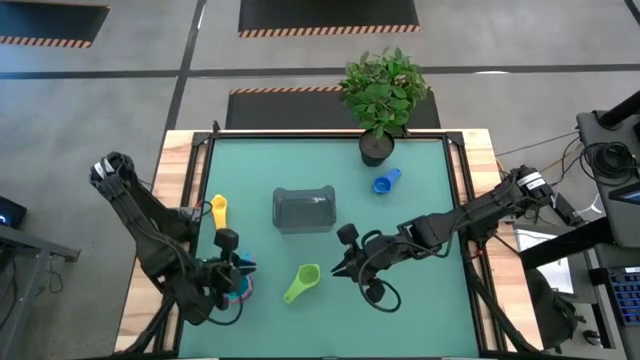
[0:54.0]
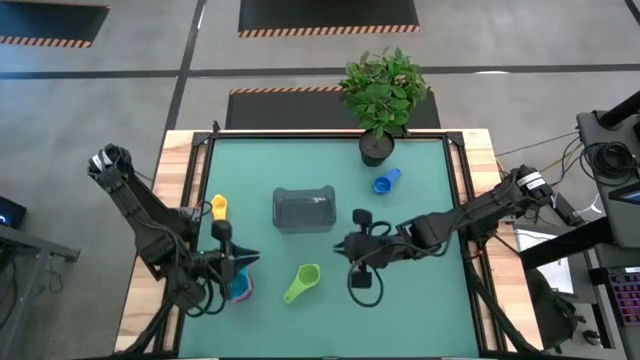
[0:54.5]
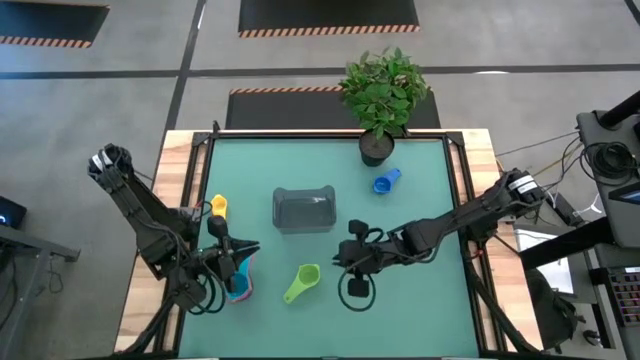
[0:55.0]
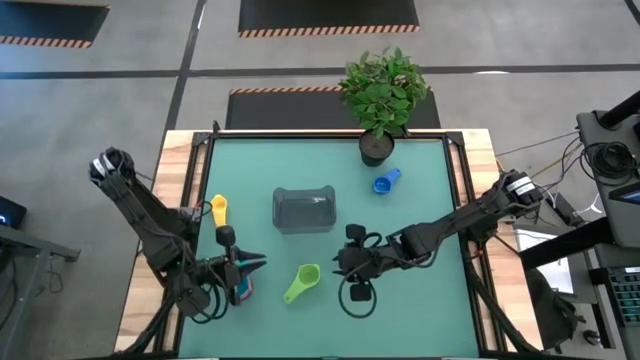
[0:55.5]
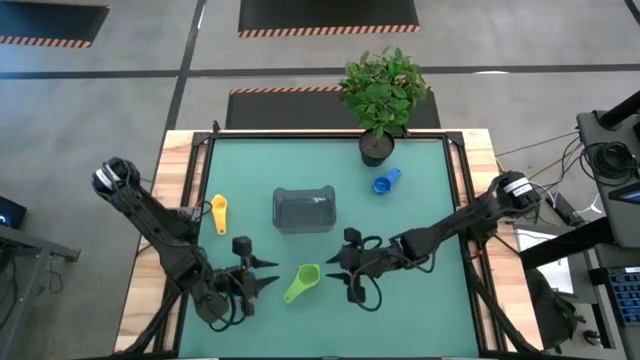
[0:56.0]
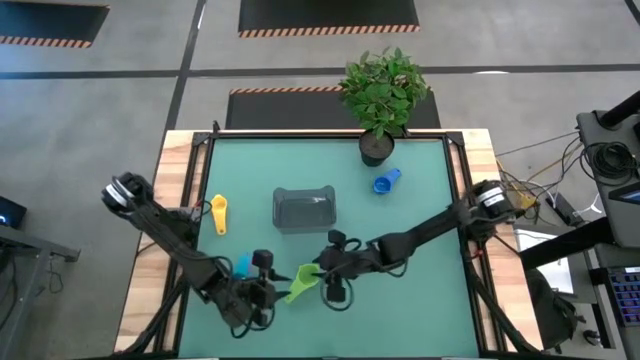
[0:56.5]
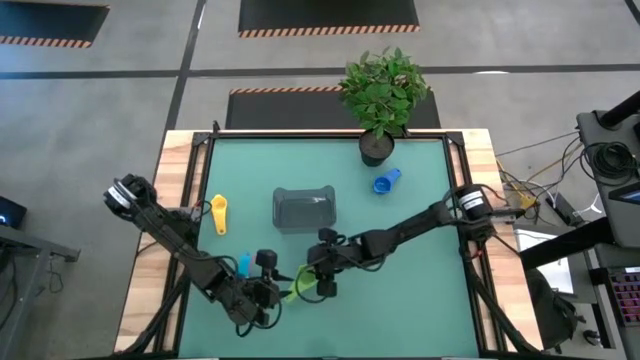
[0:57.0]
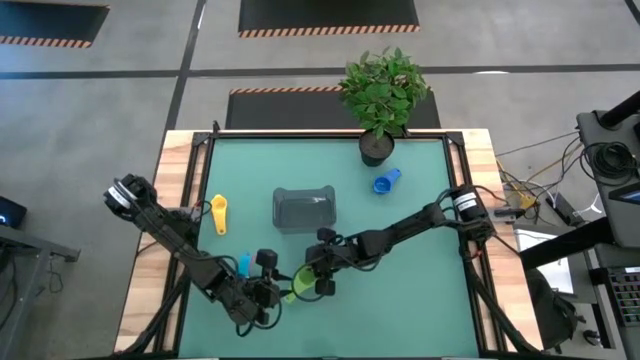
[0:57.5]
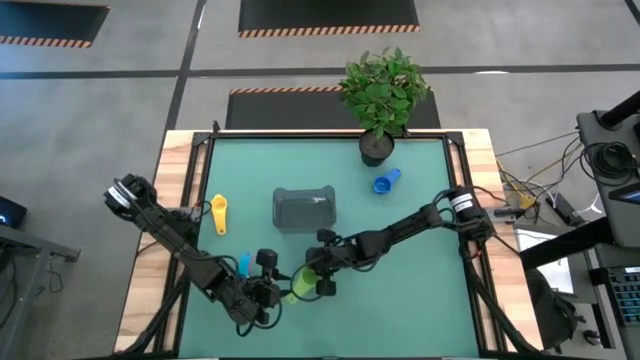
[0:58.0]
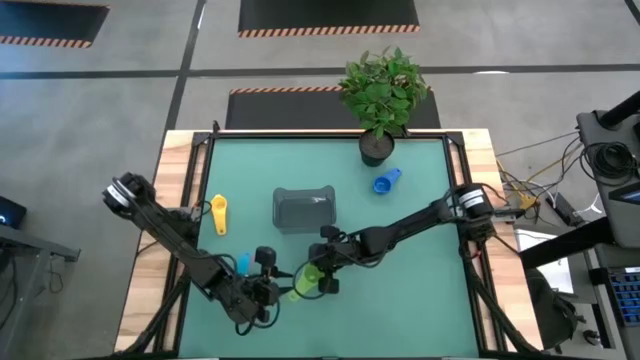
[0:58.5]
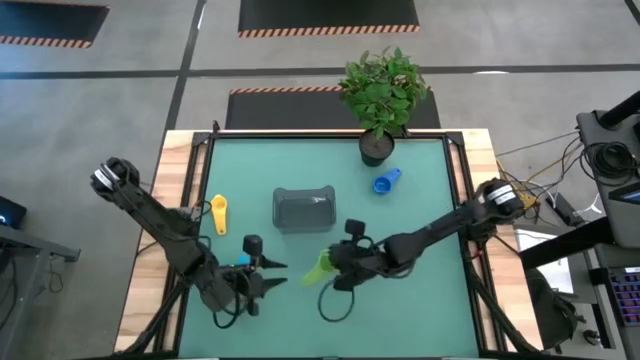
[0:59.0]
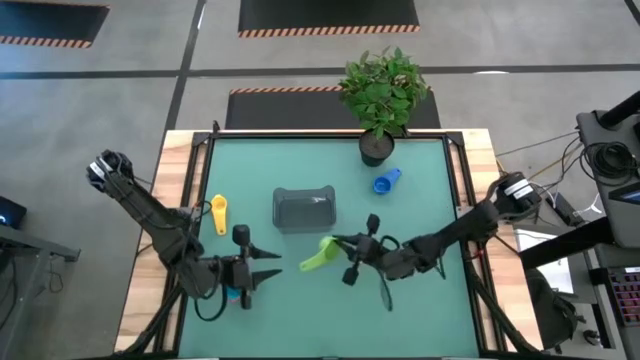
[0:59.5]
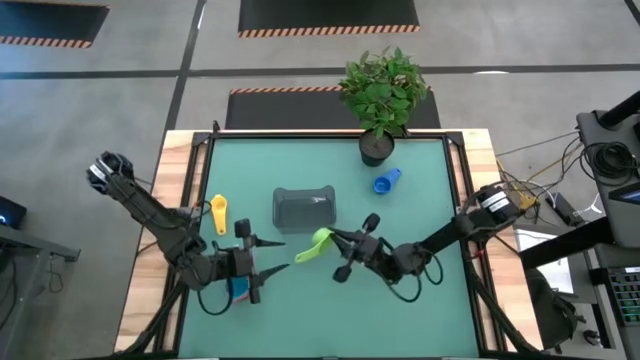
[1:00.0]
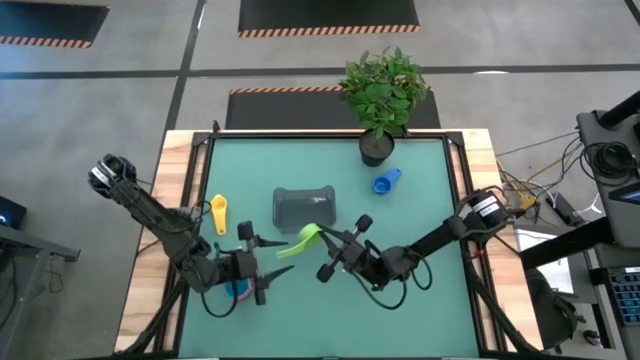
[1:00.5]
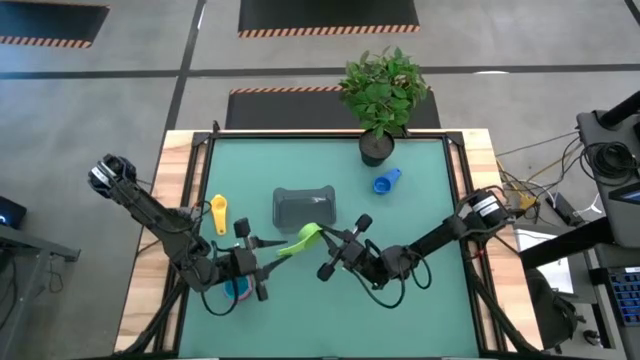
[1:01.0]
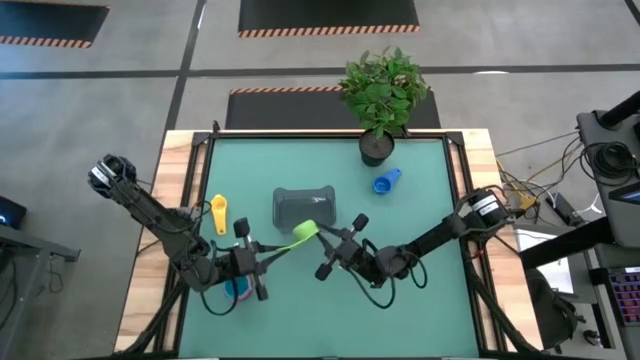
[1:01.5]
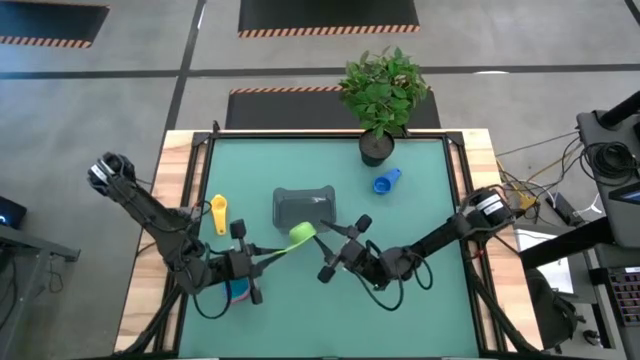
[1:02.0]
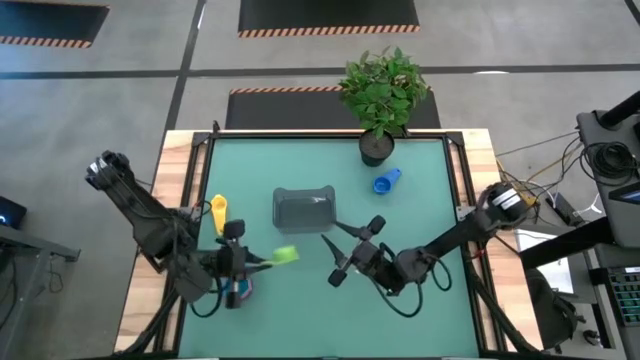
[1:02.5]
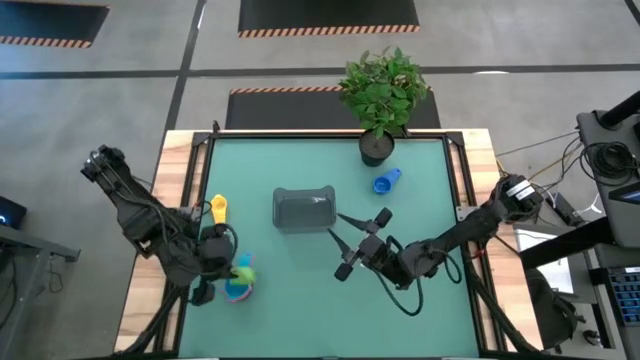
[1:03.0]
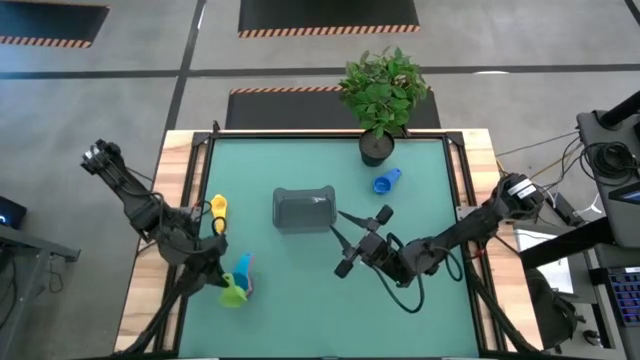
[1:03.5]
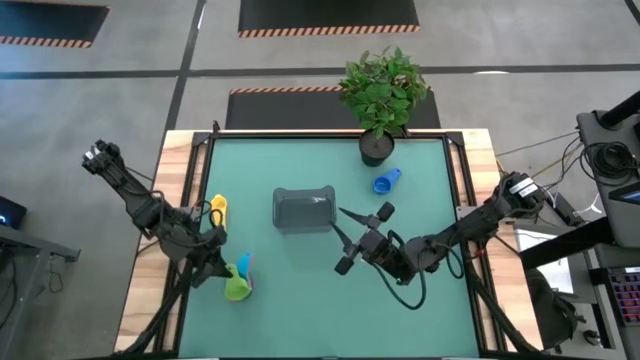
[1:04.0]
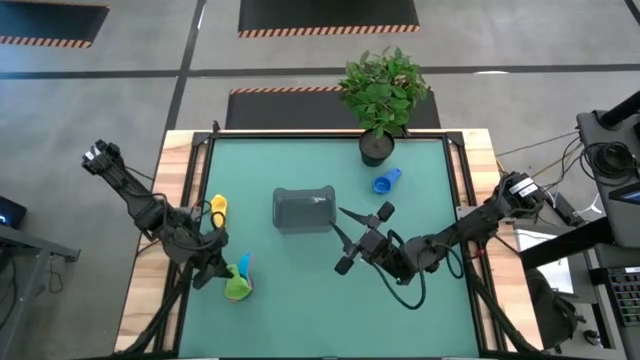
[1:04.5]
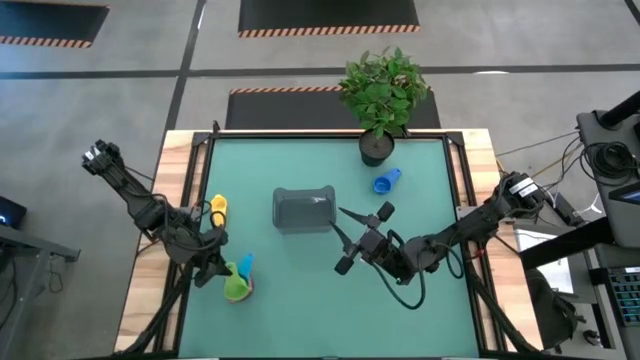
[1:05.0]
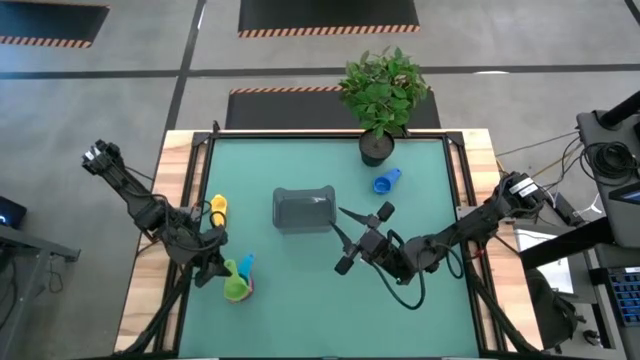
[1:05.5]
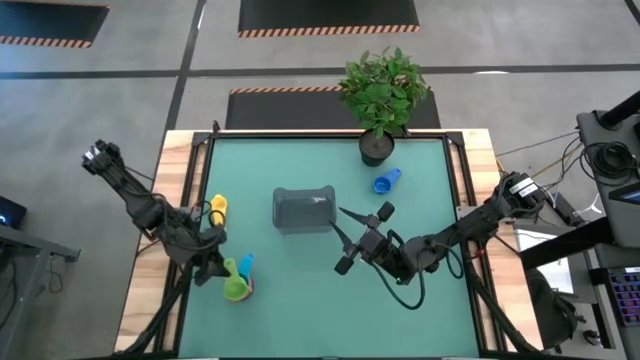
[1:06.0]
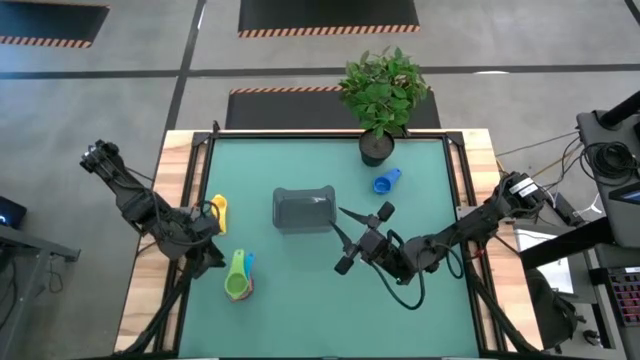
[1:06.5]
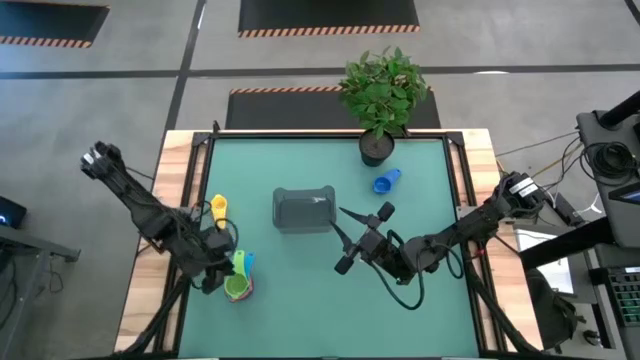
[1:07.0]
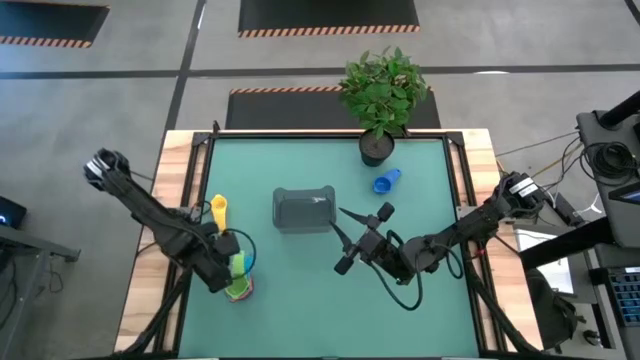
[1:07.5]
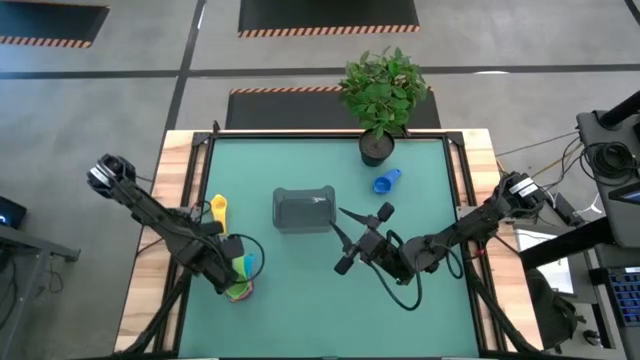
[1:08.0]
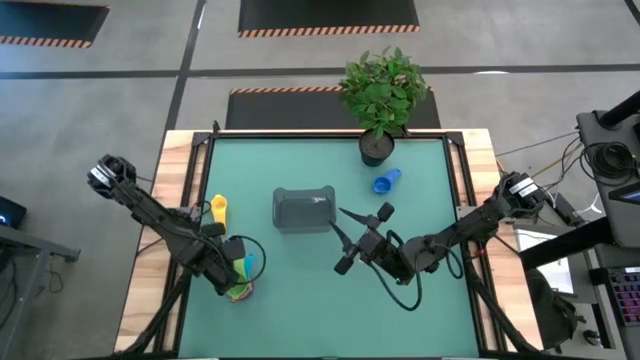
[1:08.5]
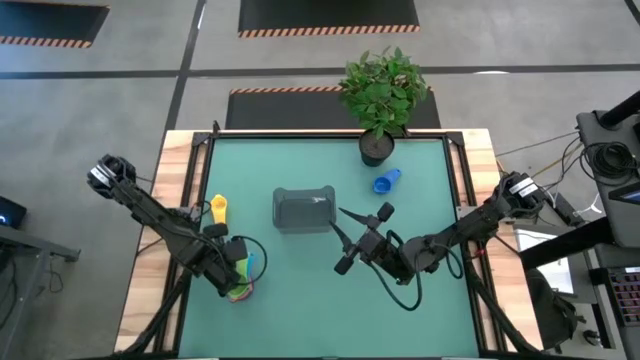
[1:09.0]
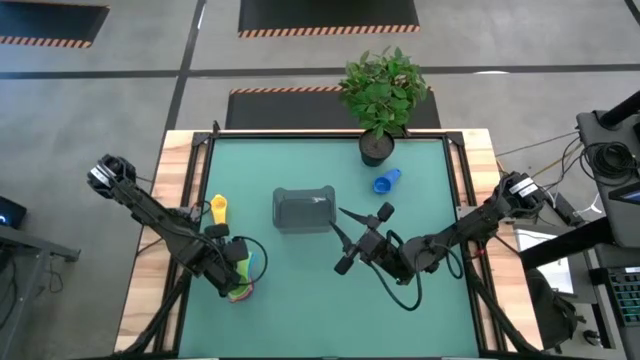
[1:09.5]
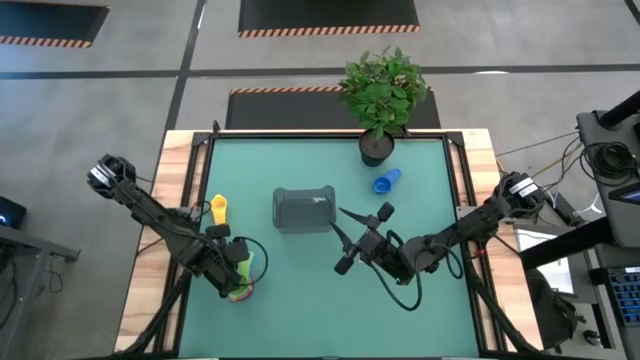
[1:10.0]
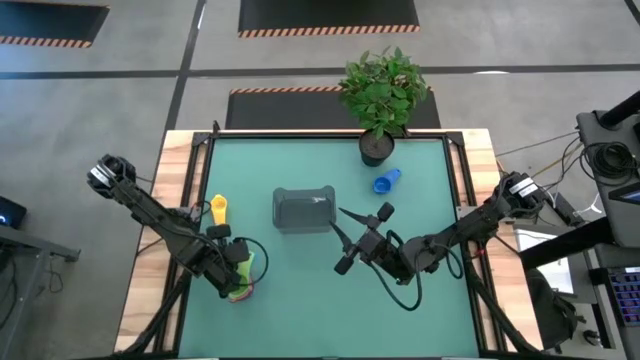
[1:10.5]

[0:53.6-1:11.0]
Task: Nest measuring cups in basket
Stack the green measuring cup on top of the light blue measuring cup
